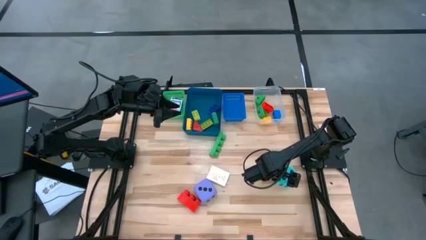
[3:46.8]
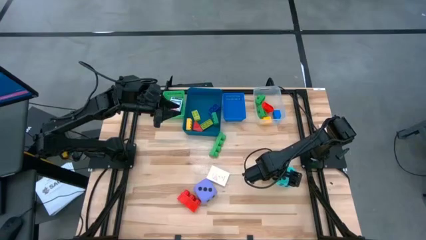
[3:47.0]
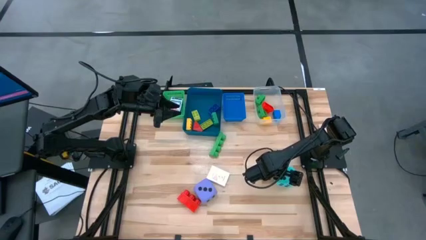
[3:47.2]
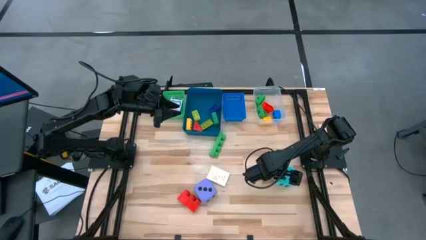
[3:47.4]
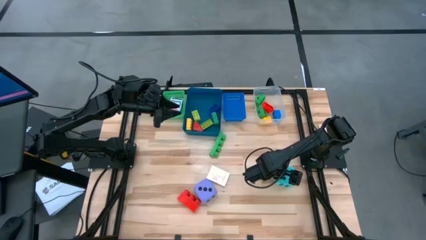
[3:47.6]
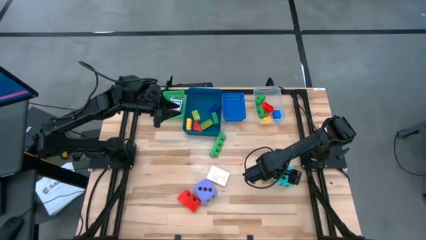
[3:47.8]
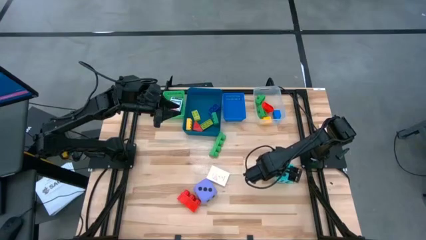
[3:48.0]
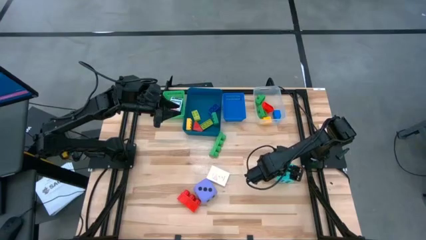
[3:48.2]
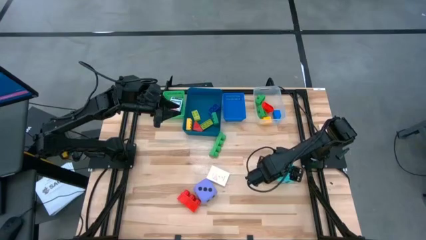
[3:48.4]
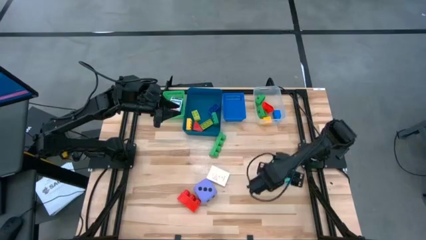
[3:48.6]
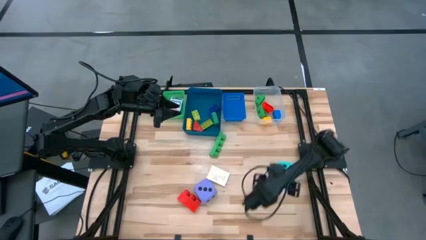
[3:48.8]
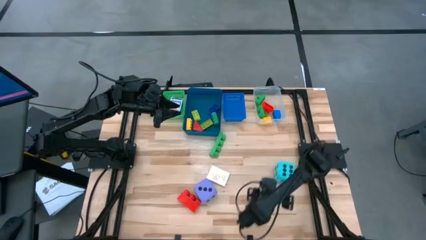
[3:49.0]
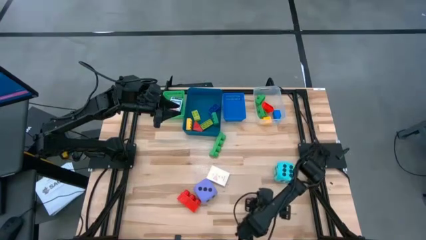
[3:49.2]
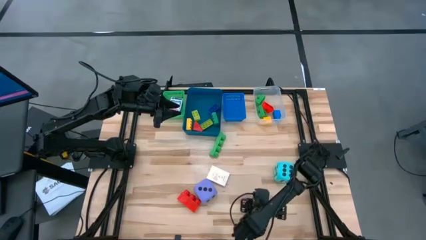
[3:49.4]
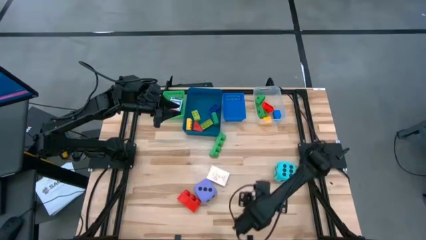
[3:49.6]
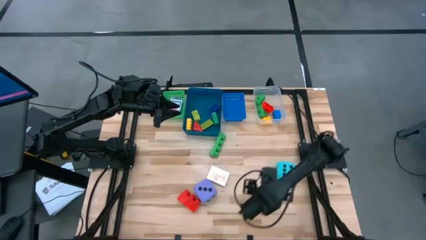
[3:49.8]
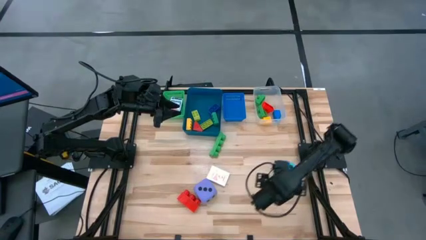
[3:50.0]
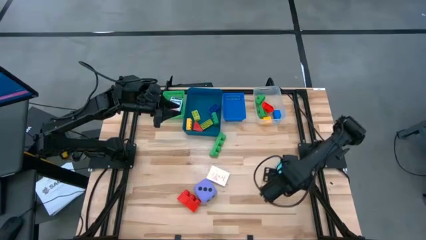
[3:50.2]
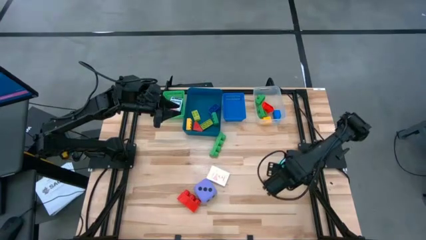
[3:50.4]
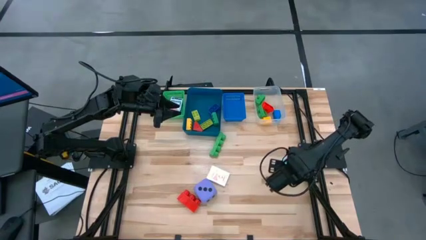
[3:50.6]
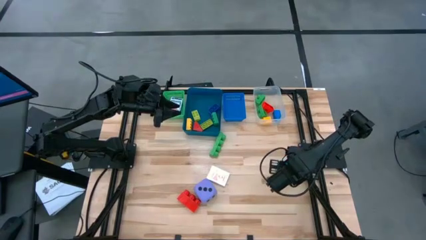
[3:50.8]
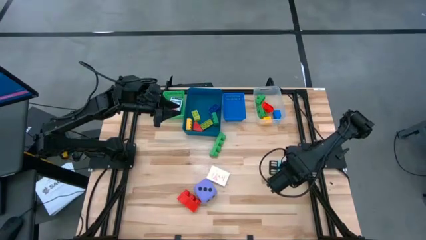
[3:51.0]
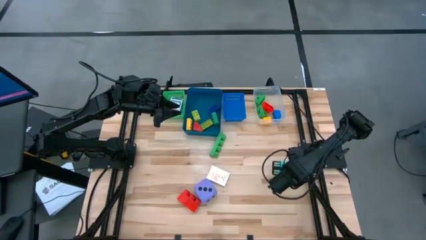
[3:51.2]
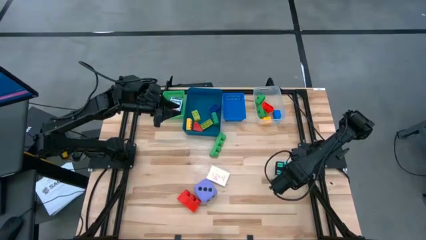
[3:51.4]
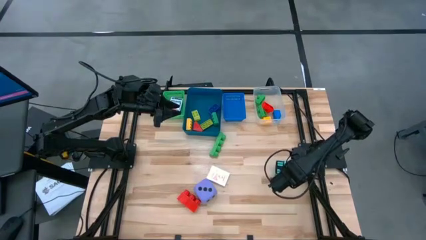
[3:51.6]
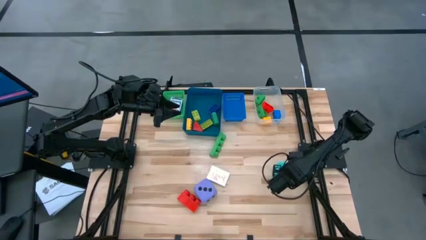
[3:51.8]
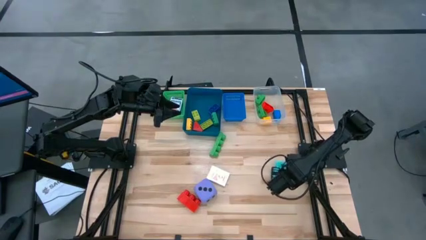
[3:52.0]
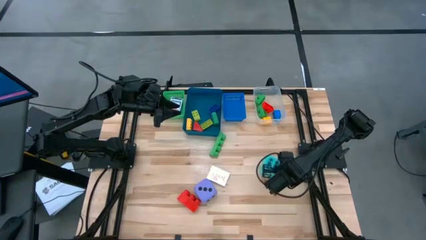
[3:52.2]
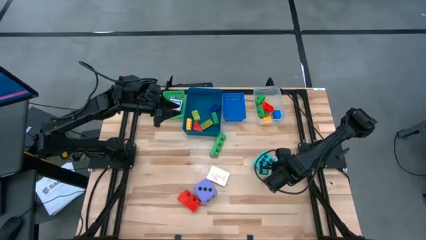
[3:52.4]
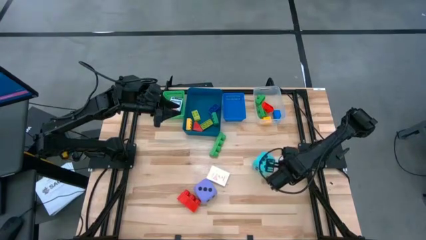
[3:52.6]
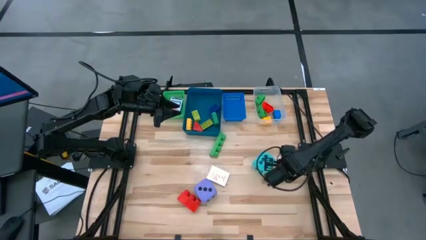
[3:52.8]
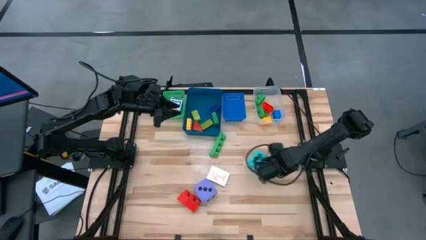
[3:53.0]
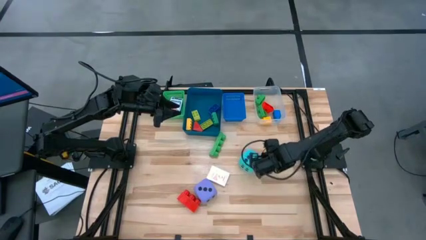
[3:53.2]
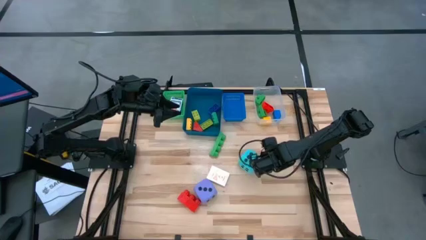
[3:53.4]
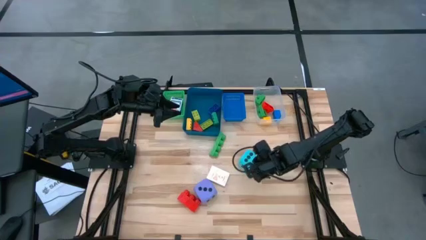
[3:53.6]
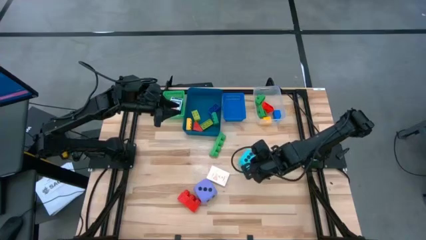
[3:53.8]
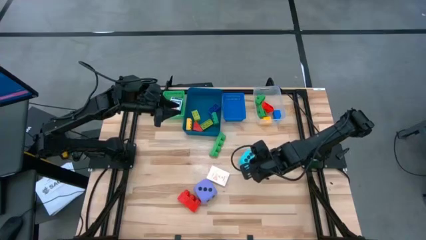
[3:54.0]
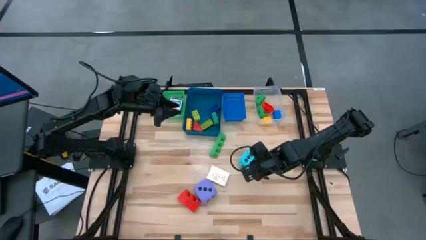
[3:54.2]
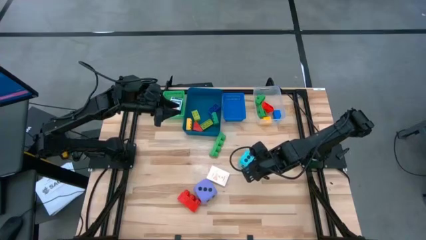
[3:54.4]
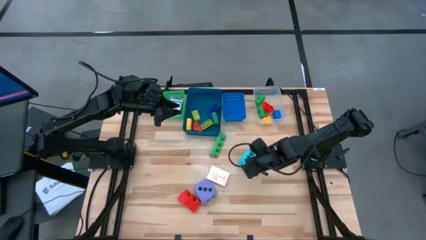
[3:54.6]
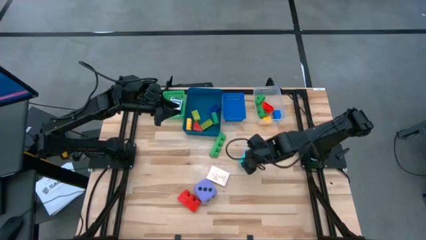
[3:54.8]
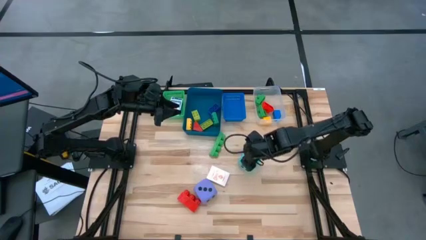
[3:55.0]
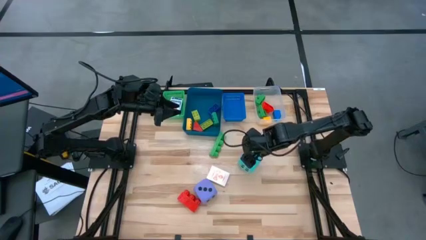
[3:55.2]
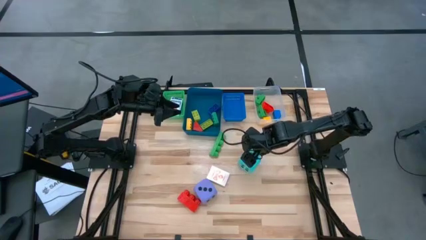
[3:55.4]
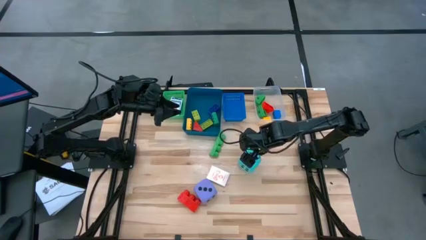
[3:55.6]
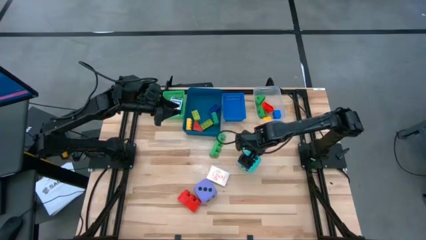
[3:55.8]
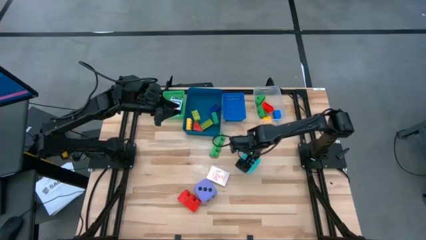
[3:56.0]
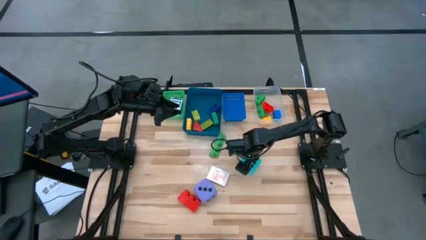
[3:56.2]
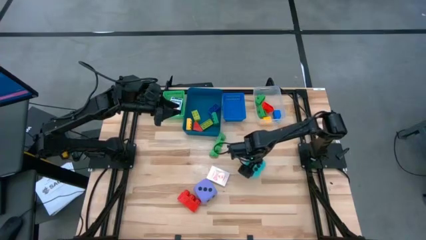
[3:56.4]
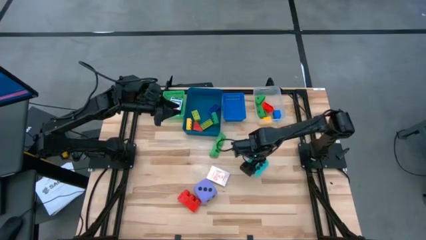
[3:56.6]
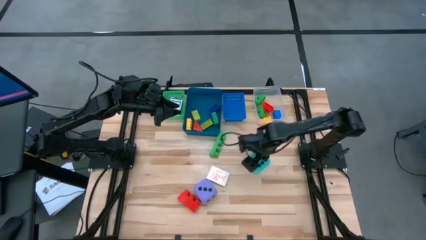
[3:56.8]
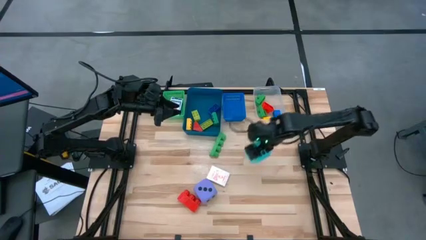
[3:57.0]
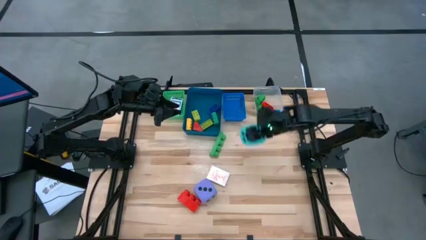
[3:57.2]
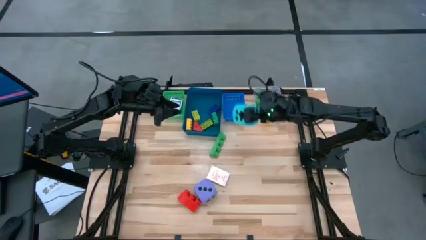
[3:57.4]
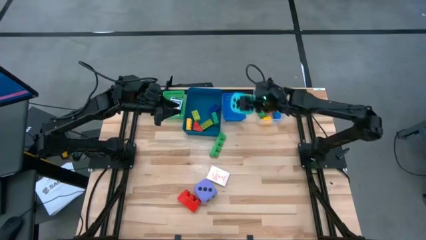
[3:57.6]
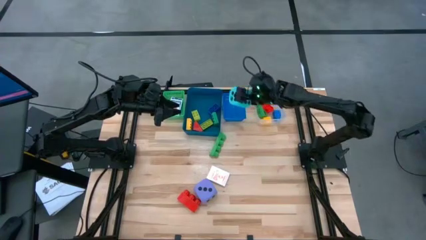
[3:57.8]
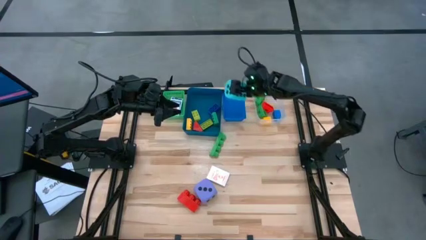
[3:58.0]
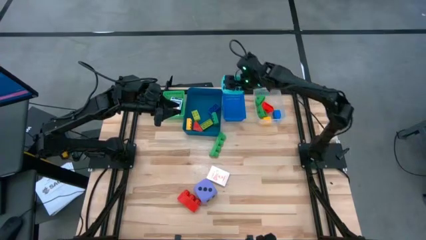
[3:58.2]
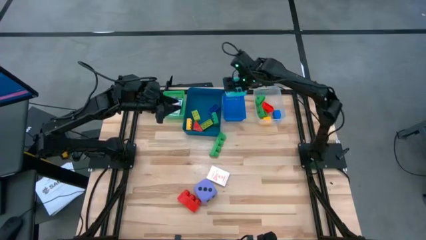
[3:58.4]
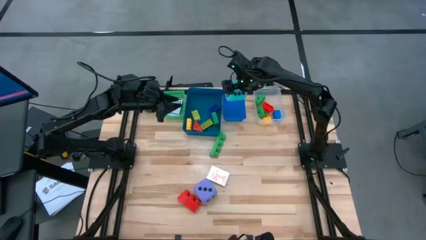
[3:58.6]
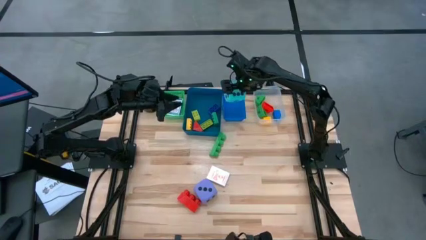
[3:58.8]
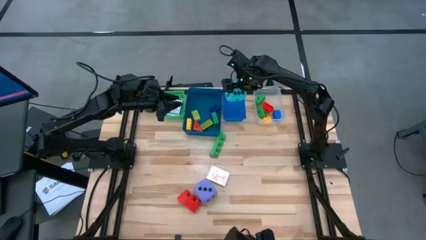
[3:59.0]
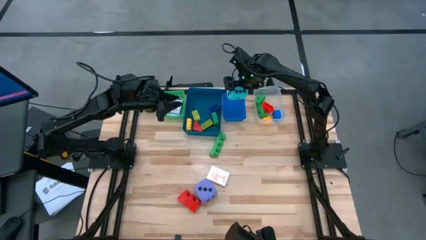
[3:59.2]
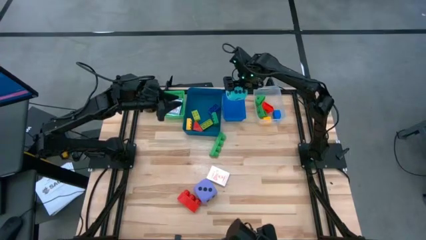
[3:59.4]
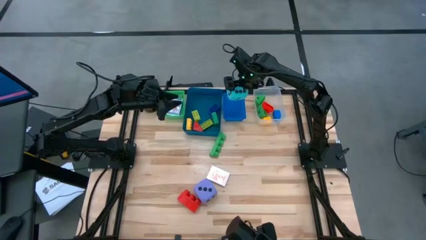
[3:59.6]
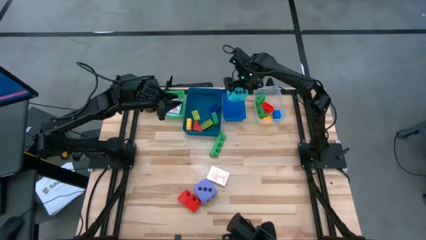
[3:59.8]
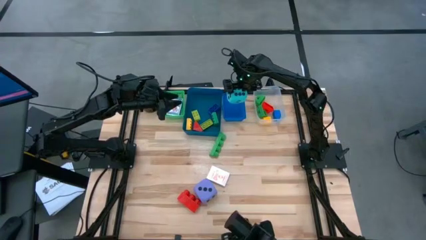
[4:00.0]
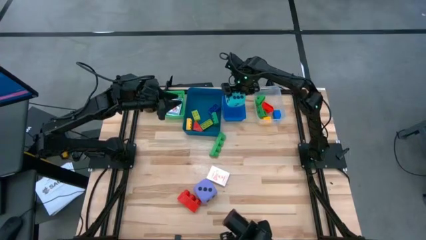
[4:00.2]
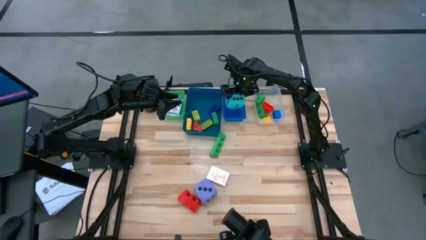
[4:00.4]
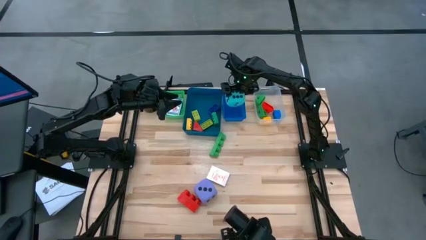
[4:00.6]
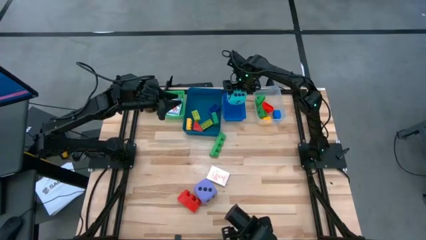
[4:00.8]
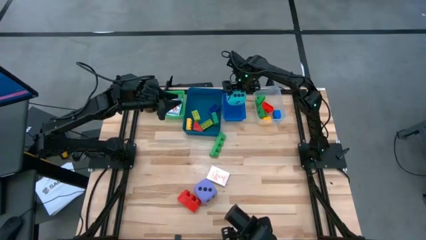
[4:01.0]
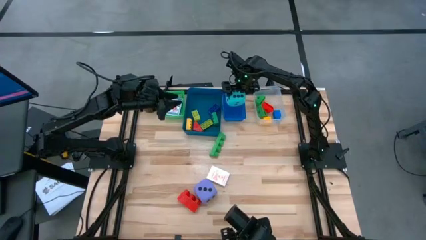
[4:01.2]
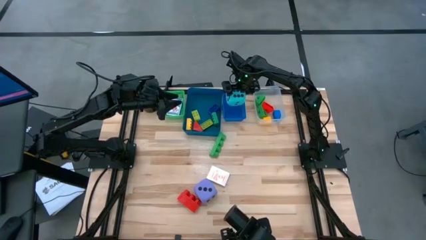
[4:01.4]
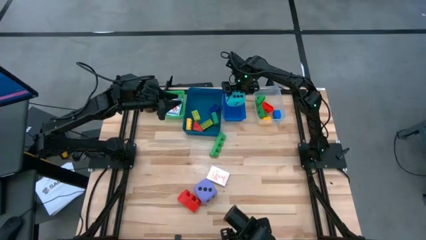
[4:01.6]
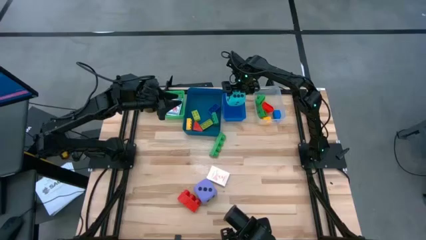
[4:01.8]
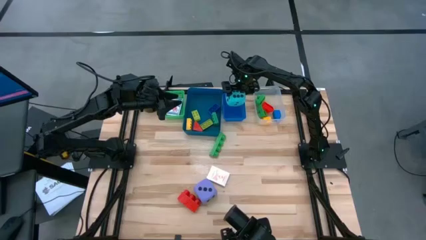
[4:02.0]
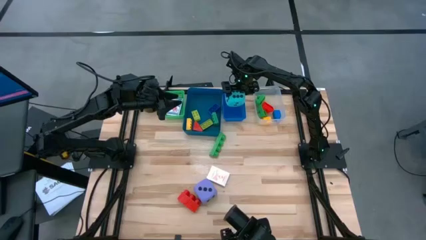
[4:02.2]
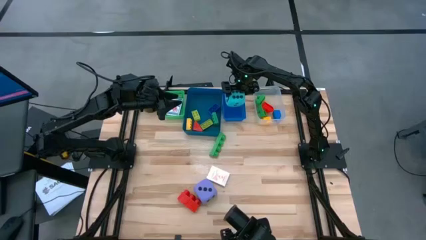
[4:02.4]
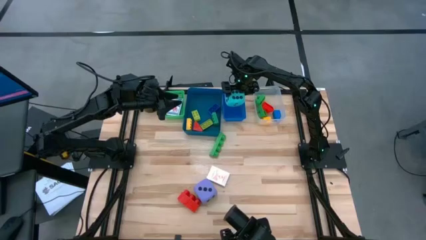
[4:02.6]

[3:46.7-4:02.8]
Task: Pick & Place Toys
Put the blue dice into the blue bin
